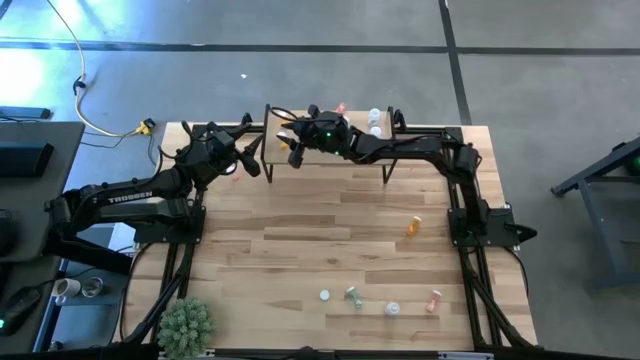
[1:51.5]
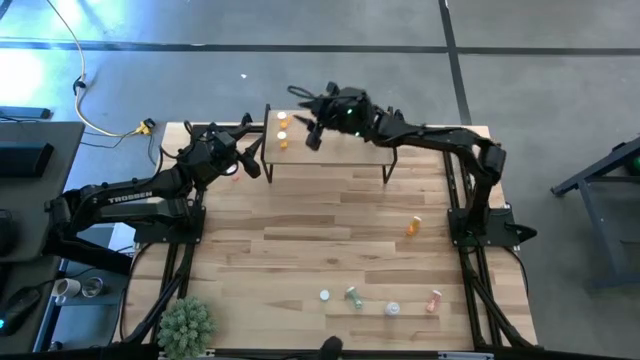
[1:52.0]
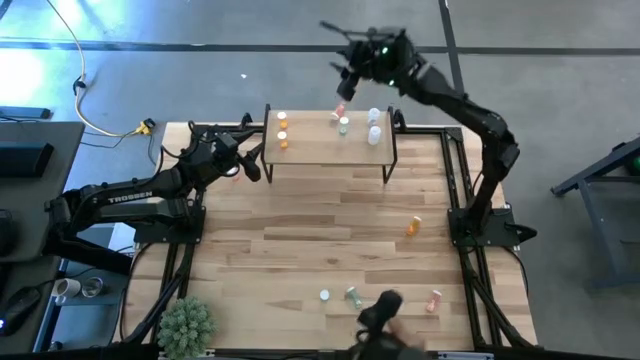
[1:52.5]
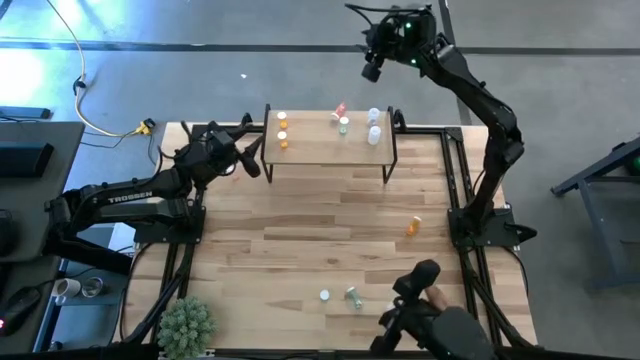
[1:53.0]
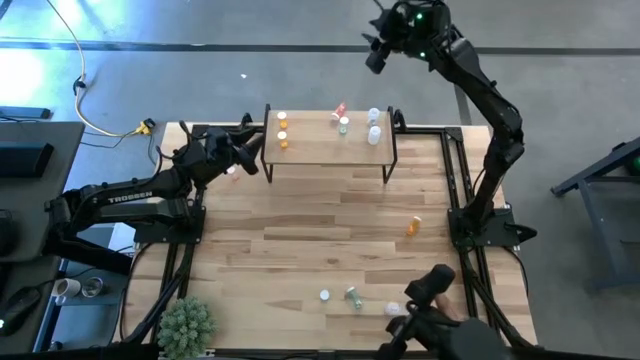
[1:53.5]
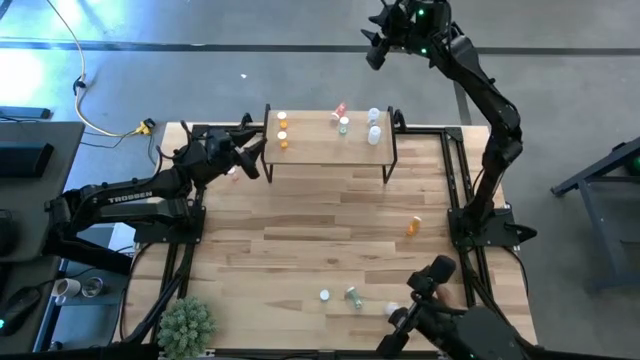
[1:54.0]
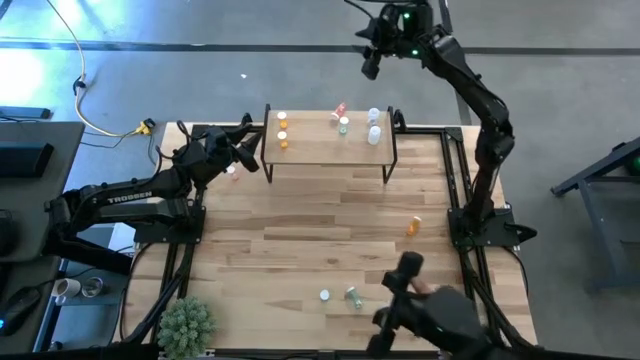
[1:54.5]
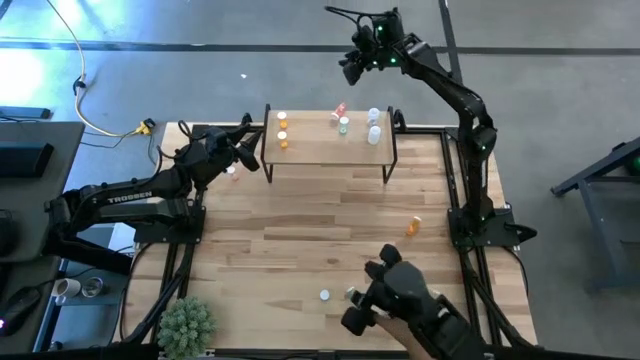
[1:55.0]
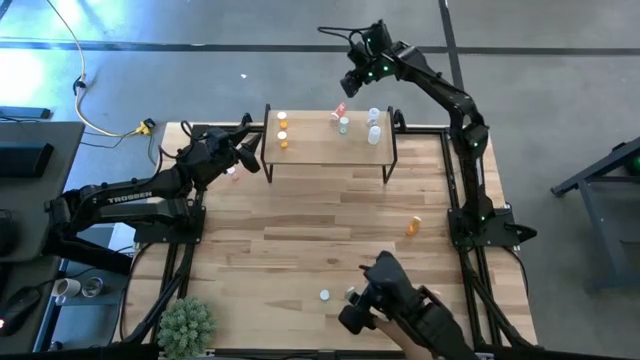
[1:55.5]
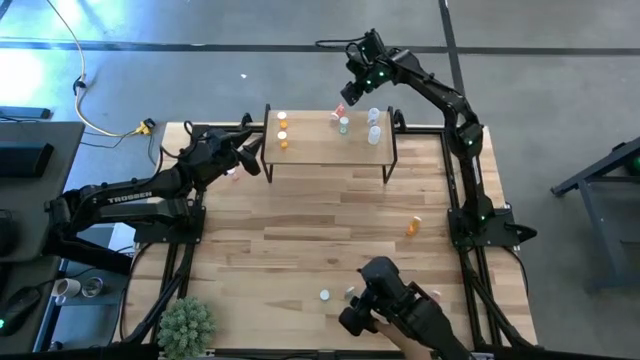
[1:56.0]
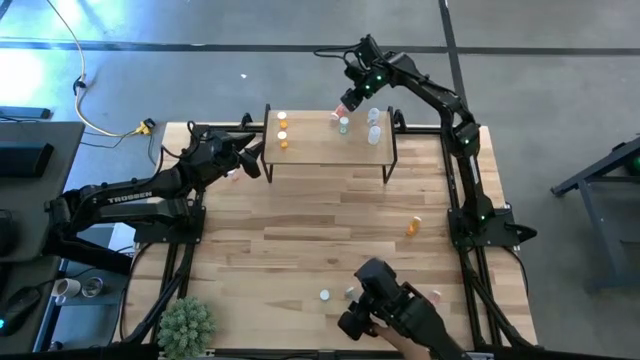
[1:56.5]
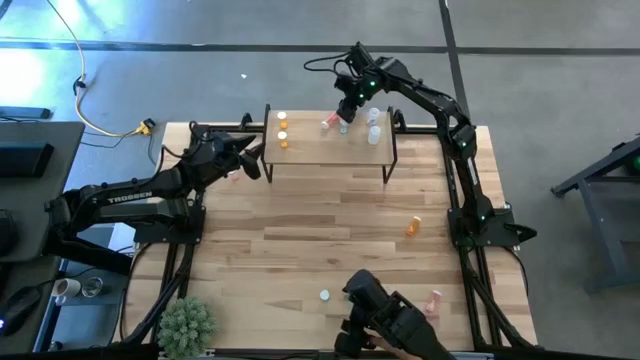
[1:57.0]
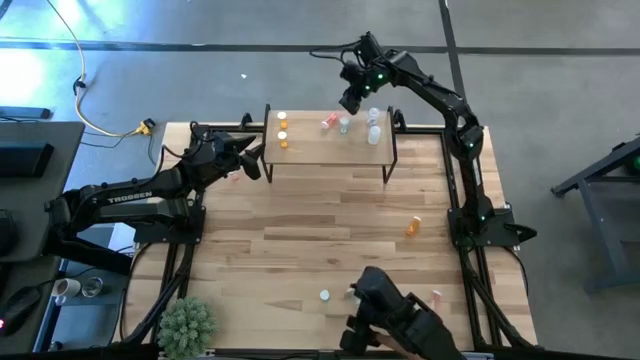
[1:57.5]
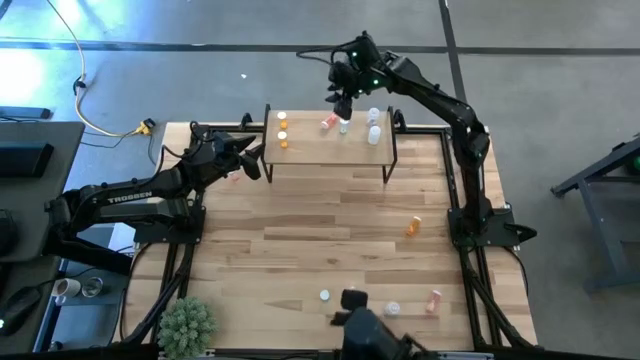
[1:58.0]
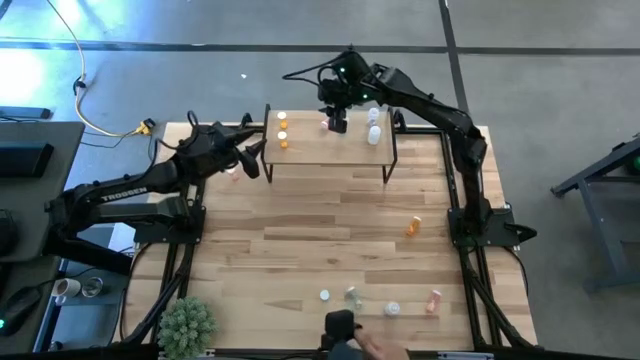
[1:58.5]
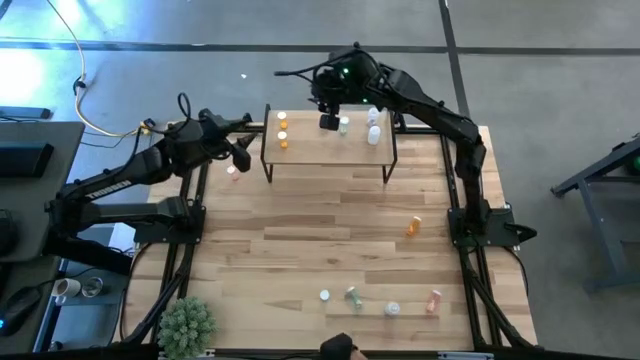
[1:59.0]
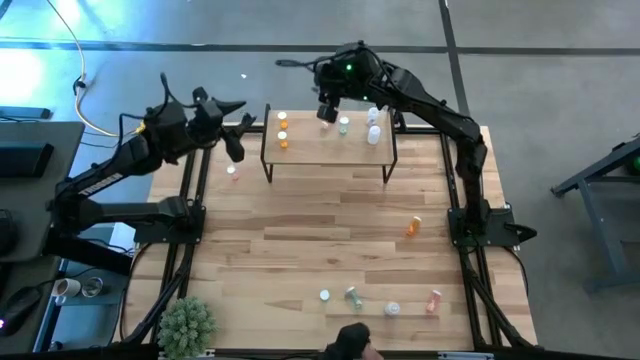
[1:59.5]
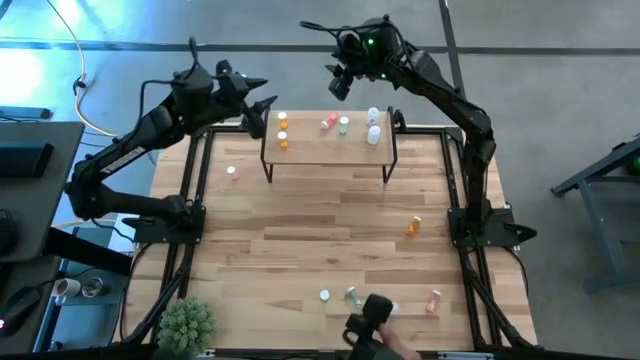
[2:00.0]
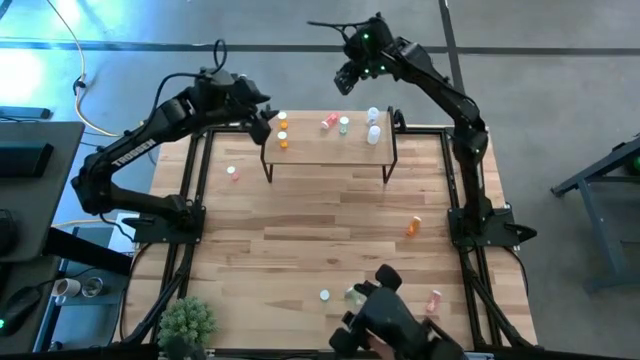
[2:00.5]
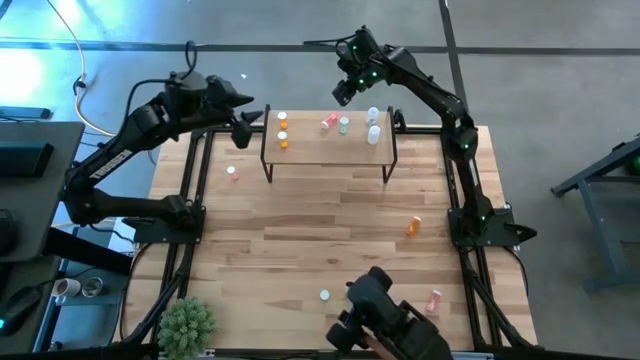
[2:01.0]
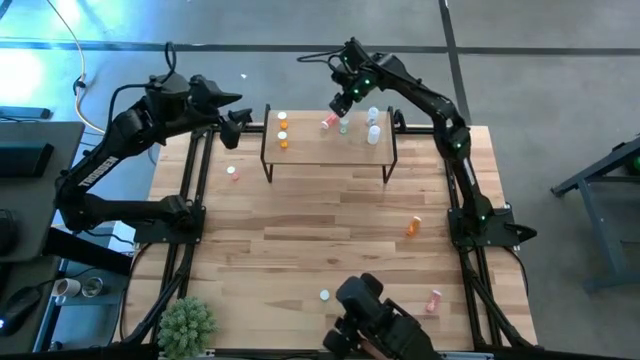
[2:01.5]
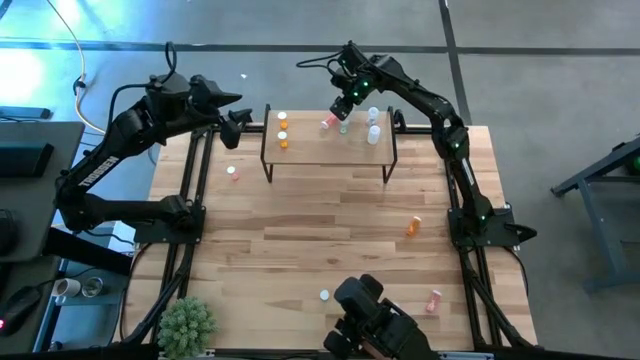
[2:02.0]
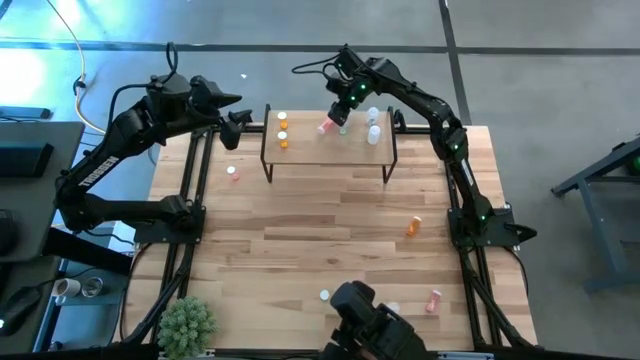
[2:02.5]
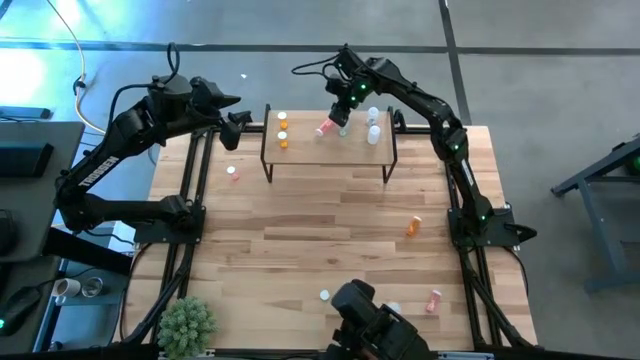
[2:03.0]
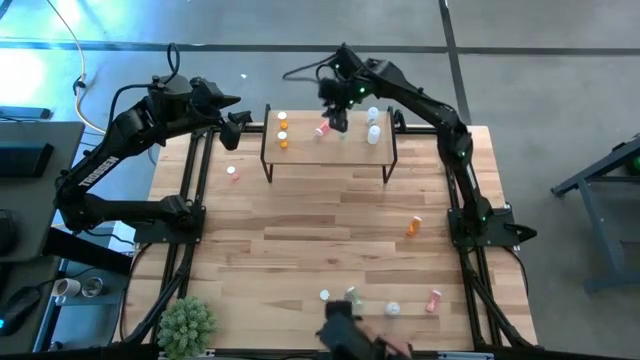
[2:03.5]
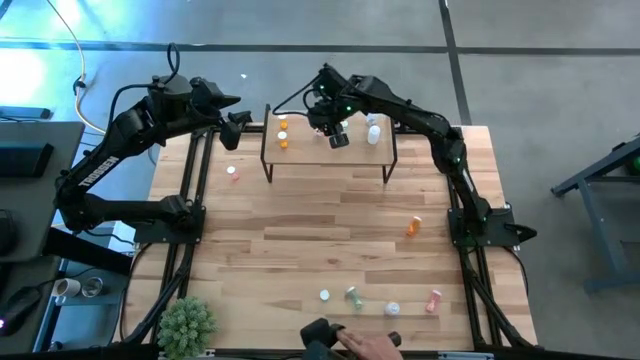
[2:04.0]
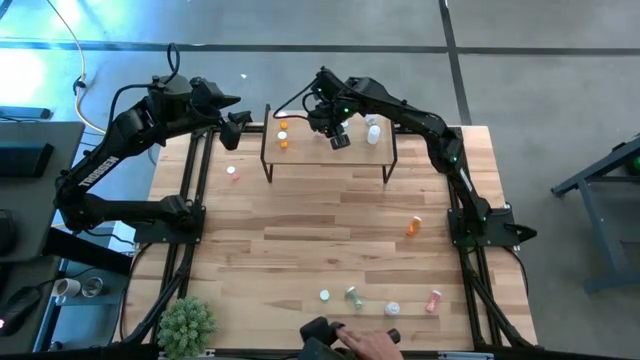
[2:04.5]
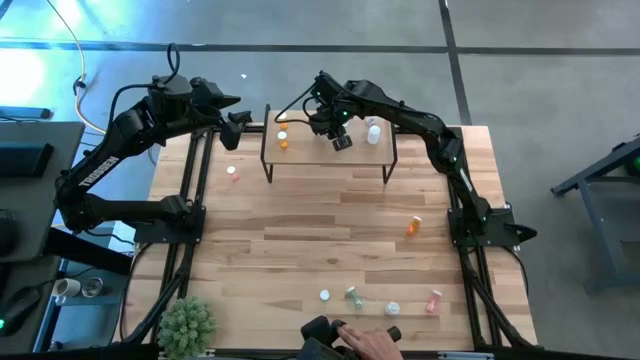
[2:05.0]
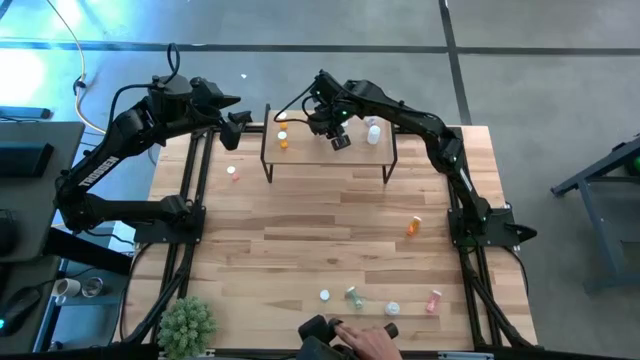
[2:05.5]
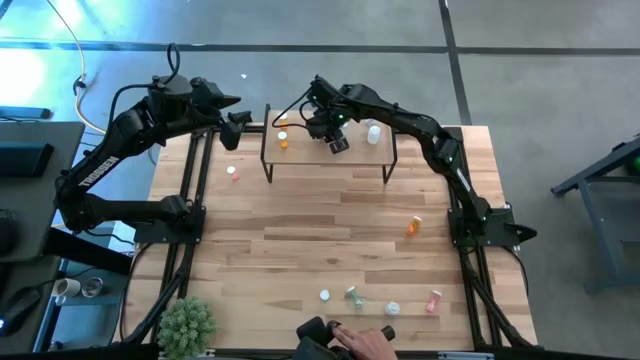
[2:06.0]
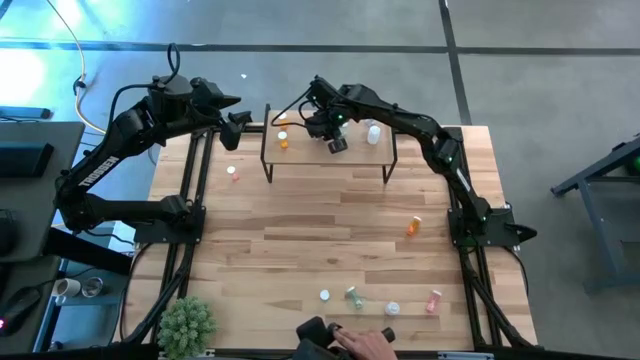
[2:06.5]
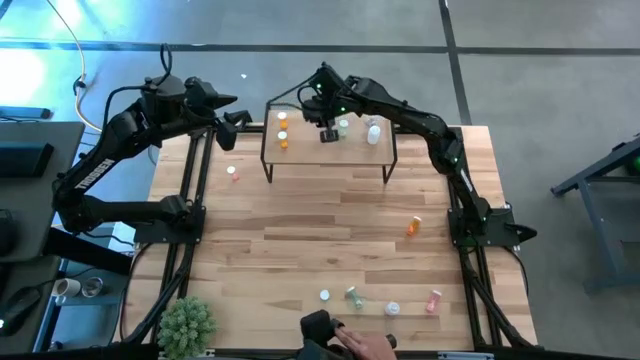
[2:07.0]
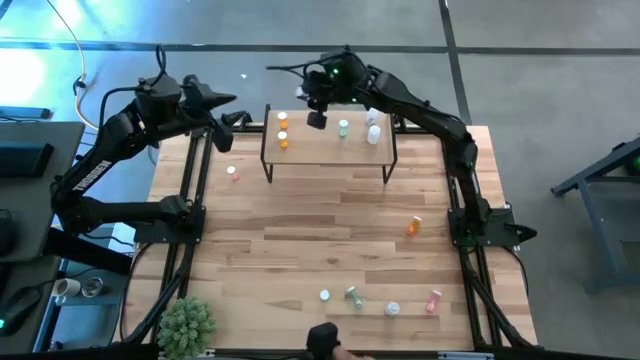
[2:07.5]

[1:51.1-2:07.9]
Task: Pick and place medicine bottles onto shelf by color
Adjust the pill bottles on the shelf

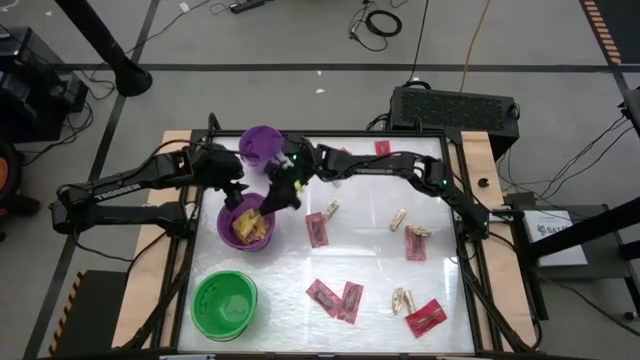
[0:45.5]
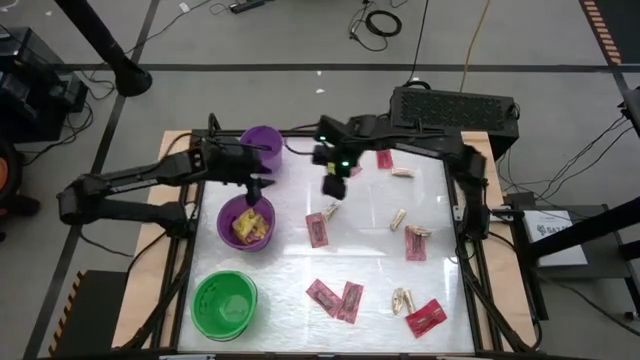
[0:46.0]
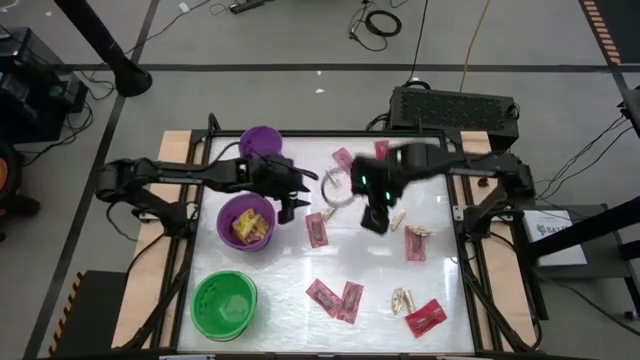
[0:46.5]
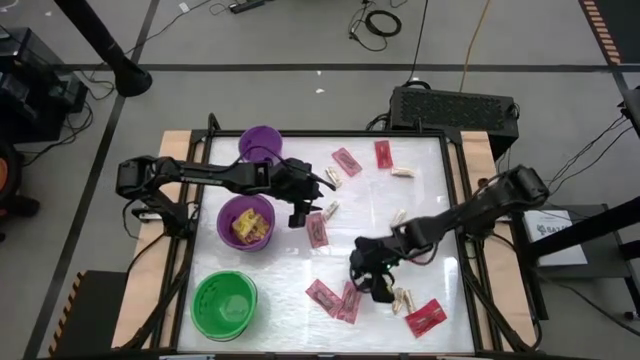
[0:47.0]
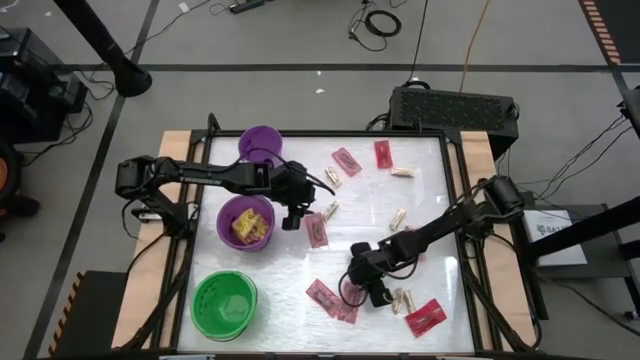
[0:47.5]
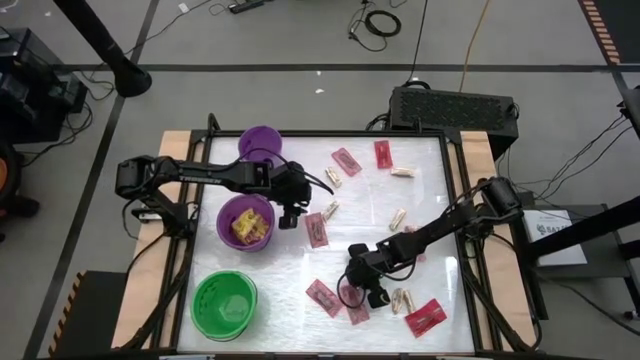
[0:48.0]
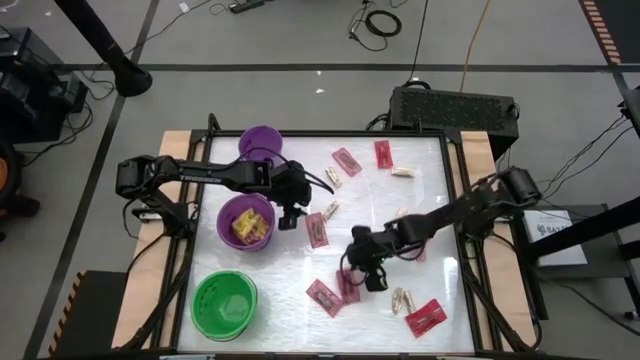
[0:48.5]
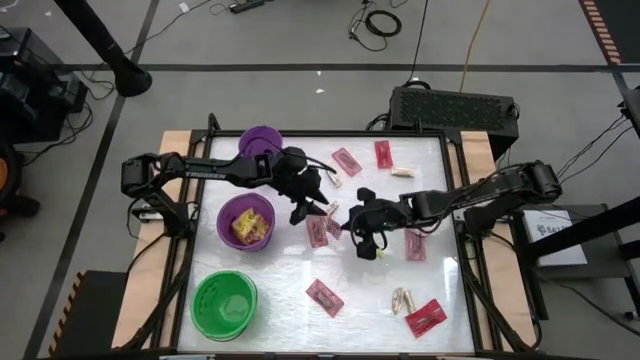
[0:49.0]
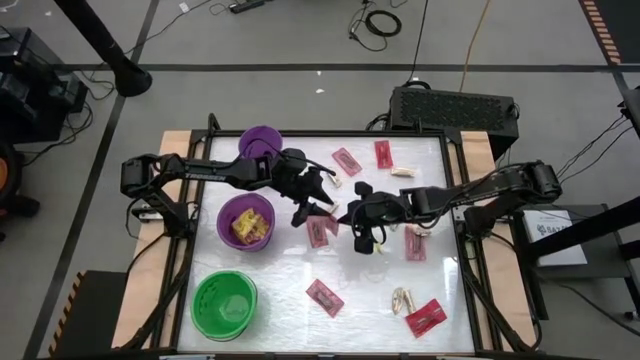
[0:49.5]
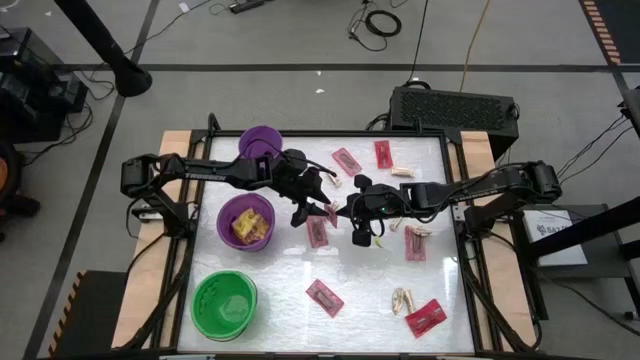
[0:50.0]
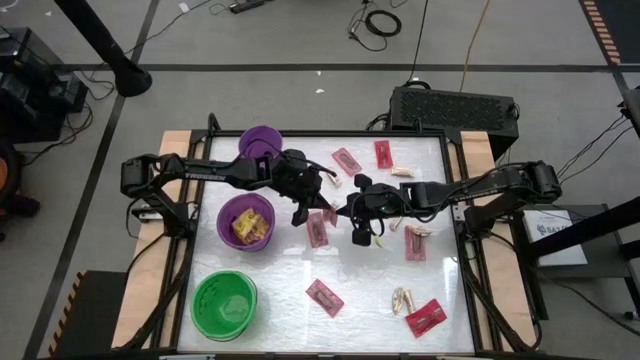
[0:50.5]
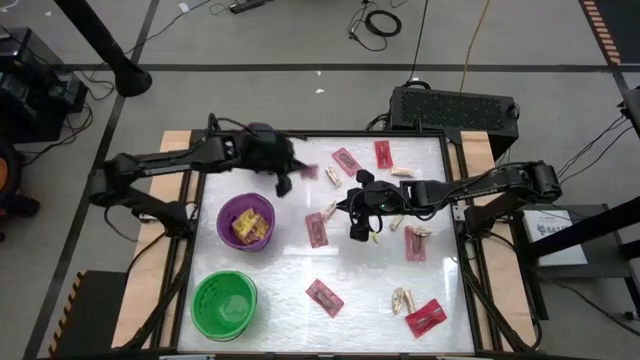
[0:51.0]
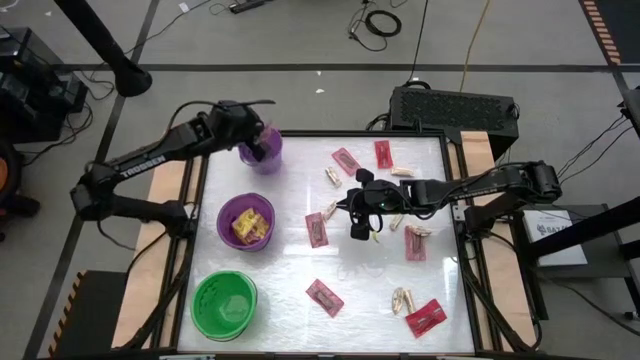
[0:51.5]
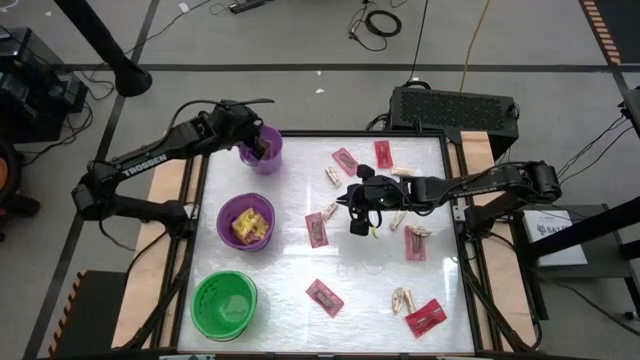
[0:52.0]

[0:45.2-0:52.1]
Task: Sort candy by brand, put in halloween buckets
Put the red candy into the top purple bucket
